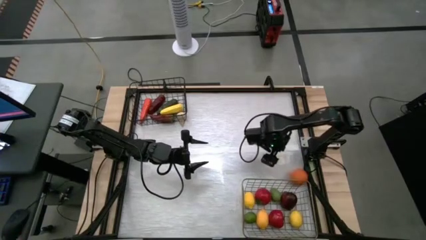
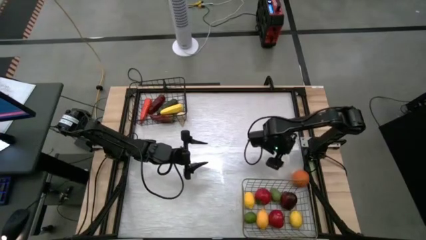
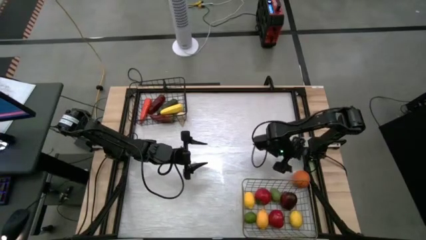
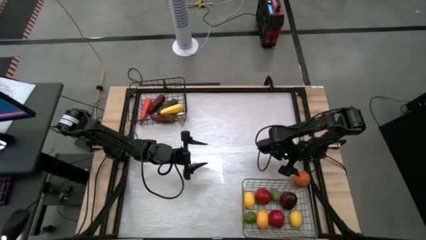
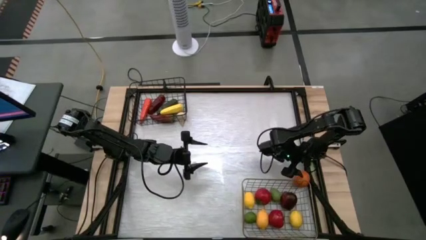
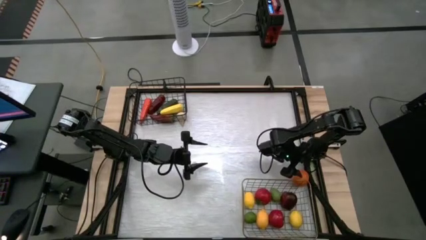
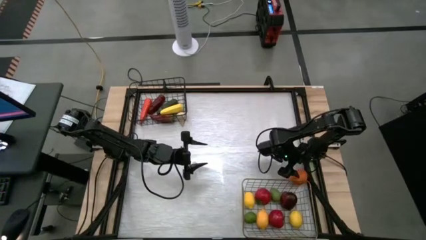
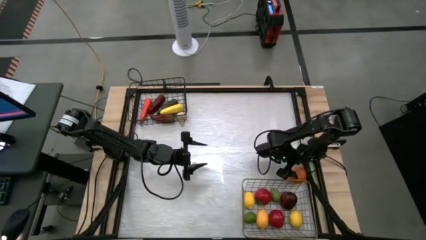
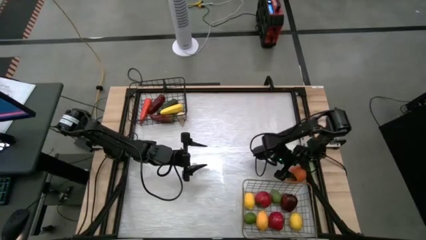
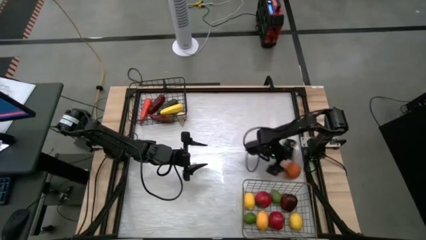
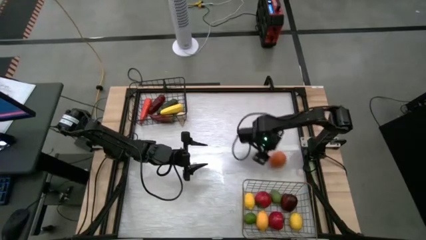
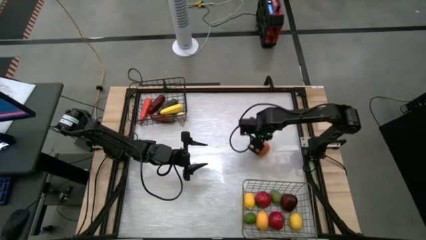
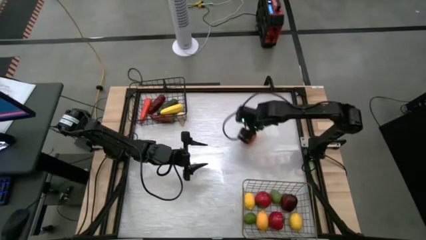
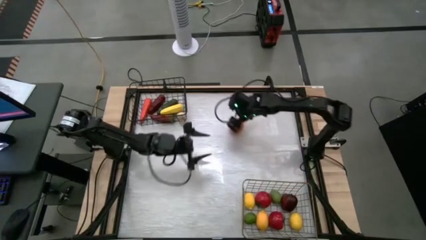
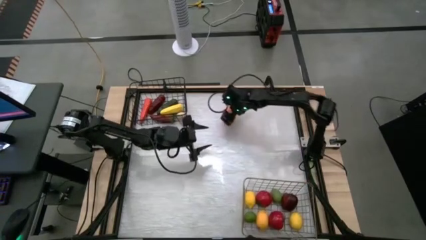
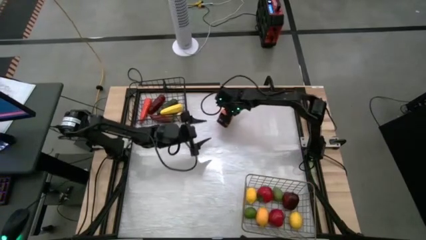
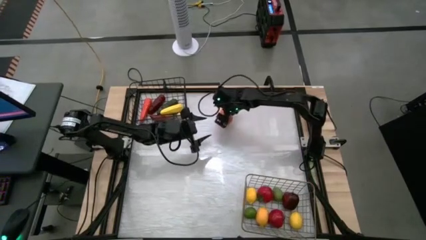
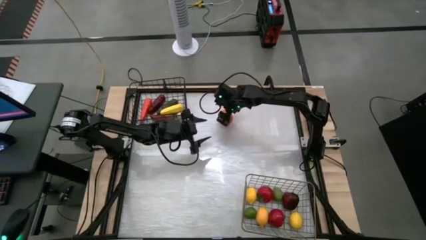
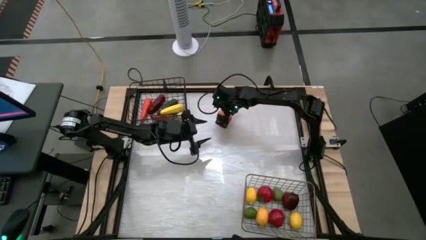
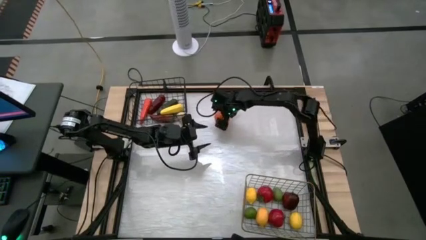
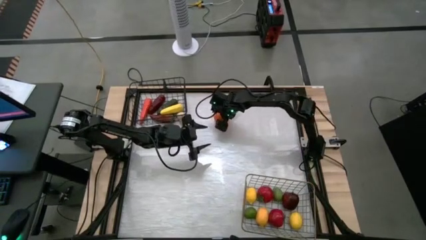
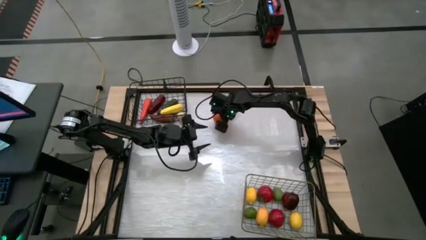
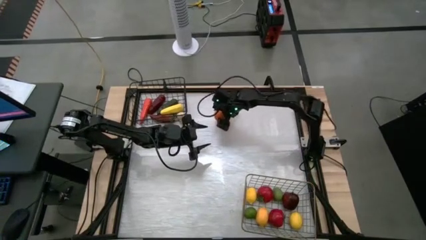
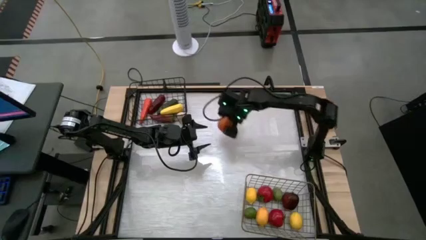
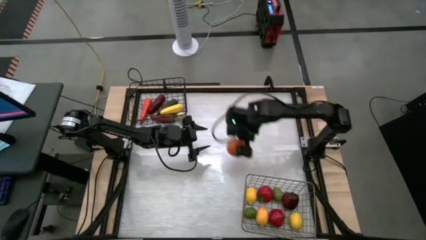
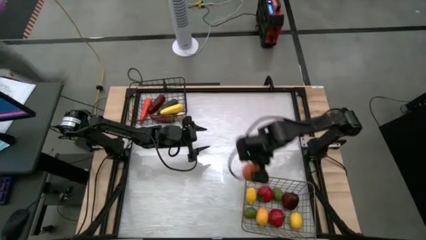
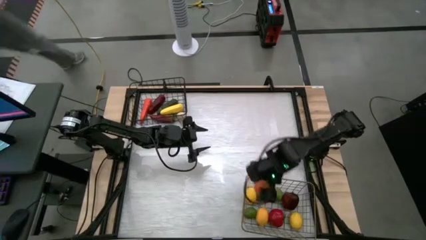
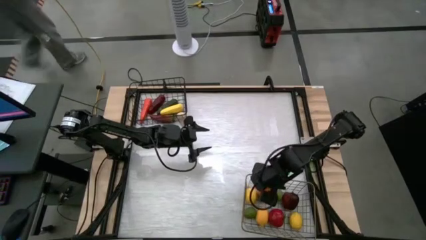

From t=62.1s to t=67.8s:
Task: Sort produce into baskets
Put the orange into the gold wire basket

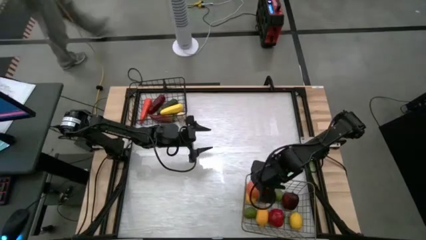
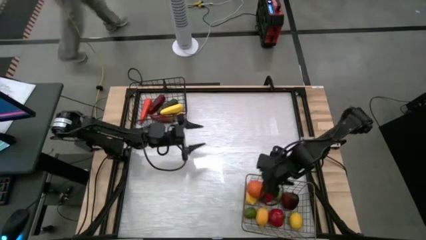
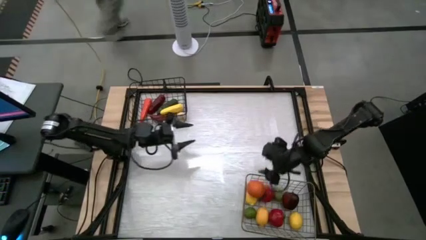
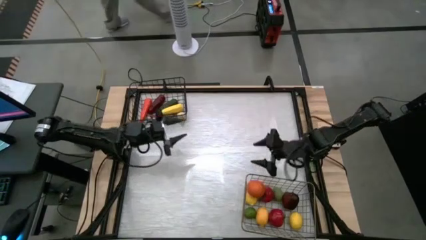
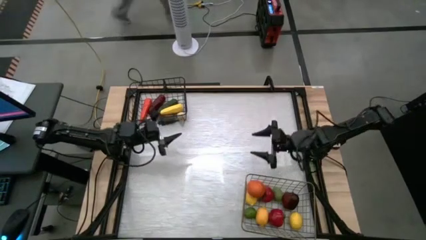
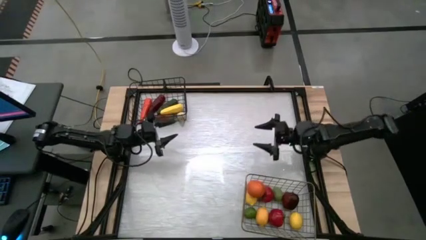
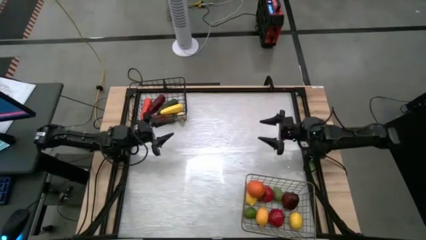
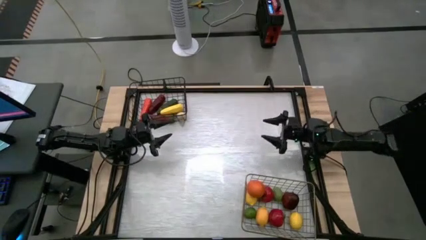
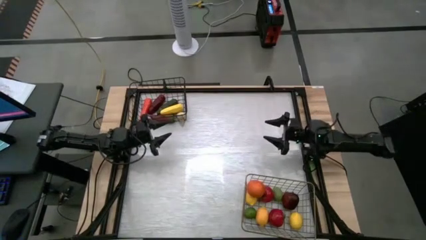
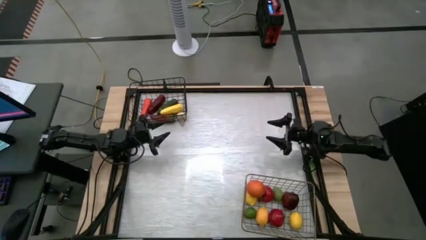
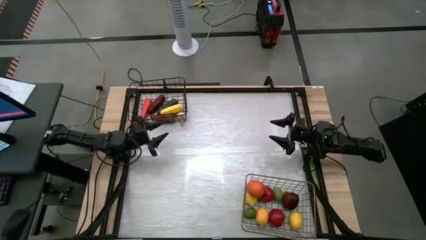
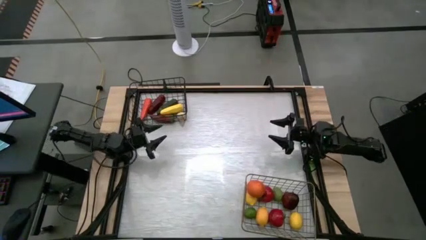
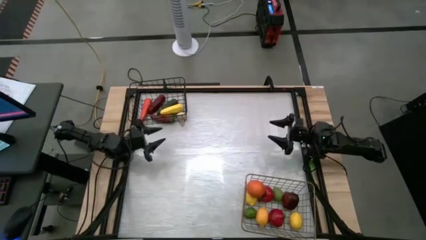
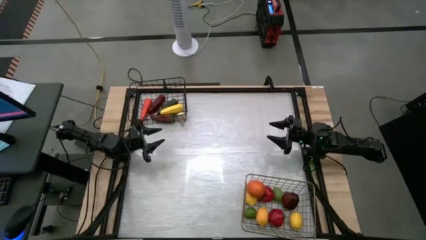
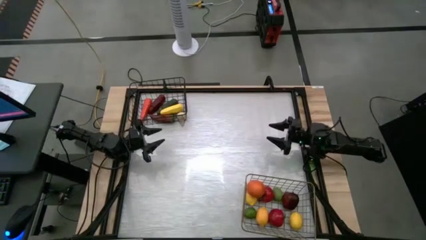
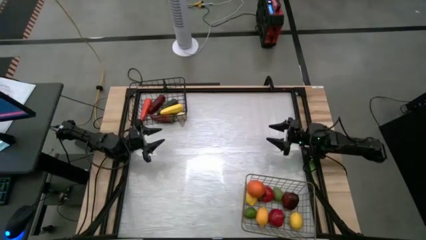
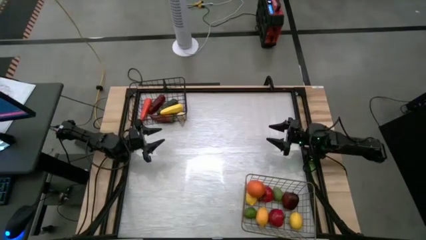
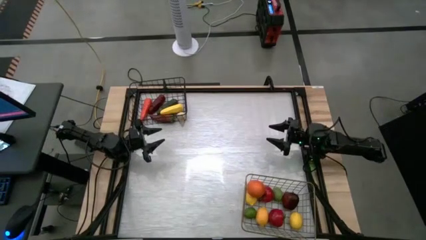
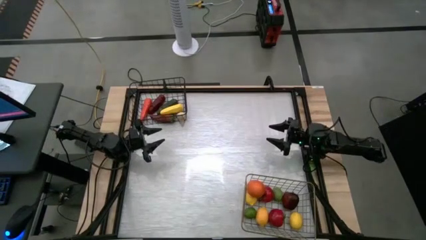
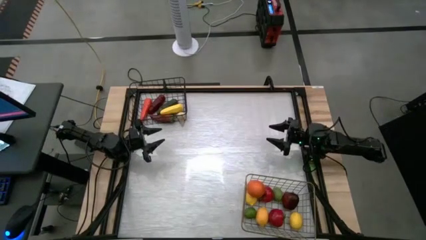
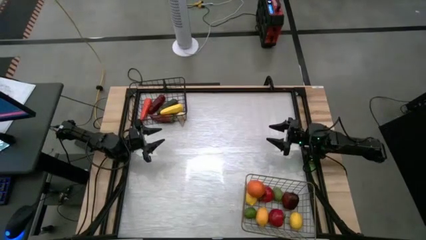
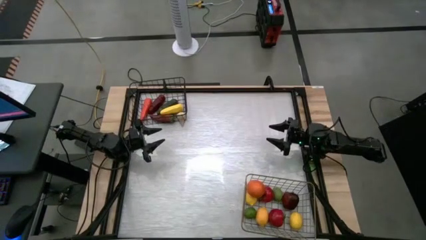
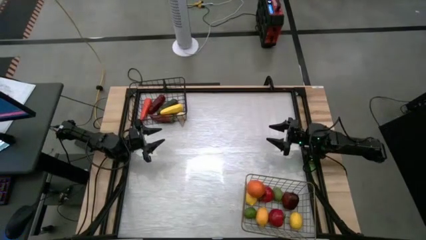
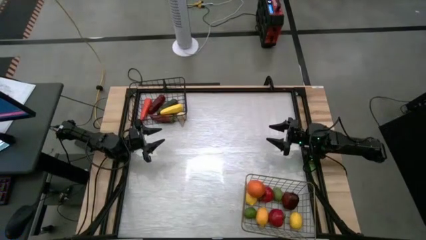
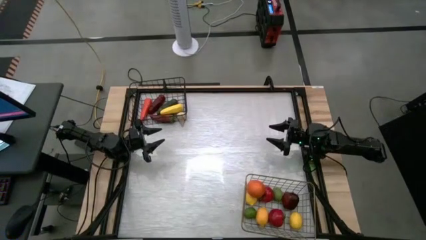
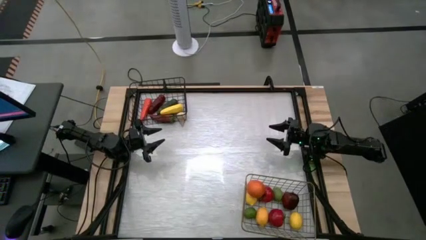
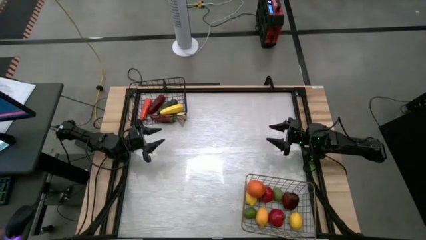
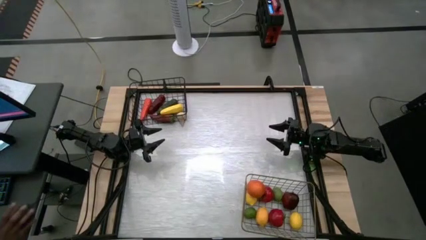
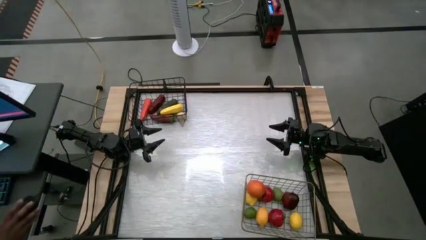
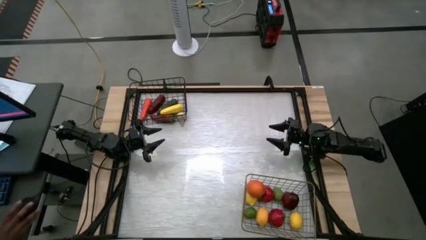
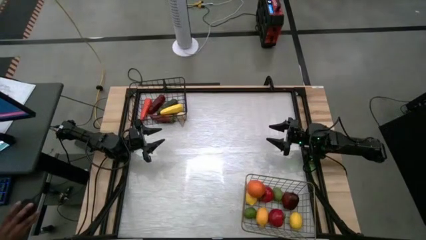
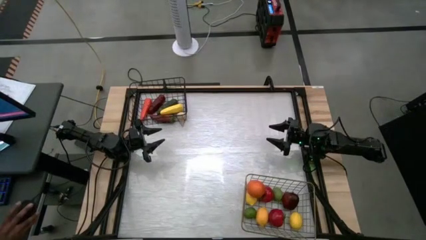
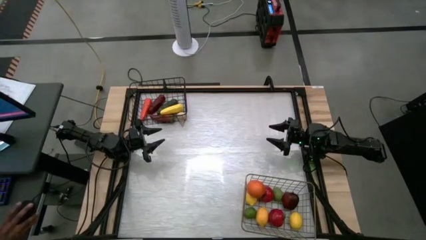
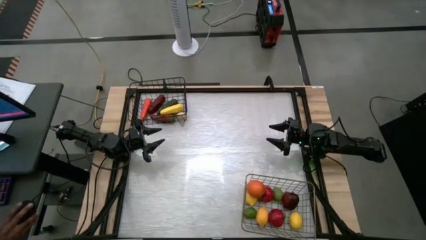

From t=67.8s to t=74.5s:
Return to Home Position

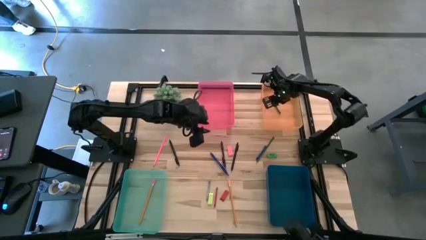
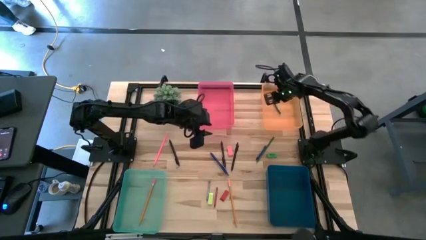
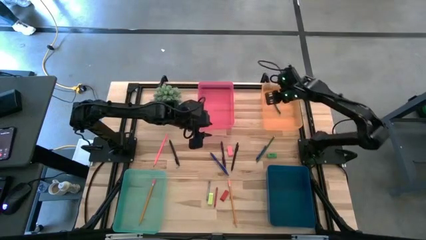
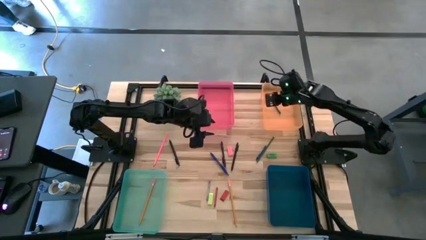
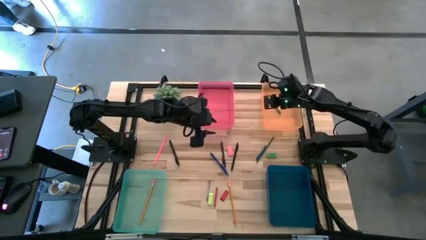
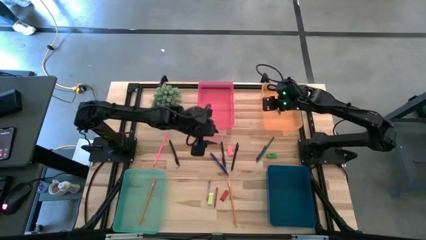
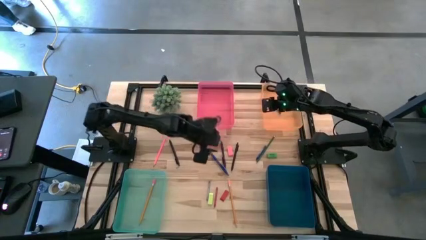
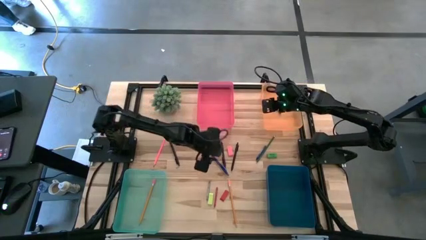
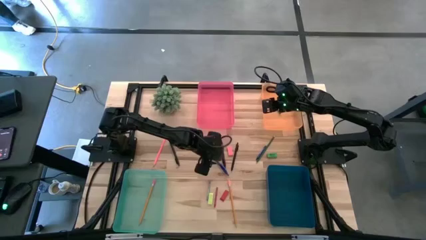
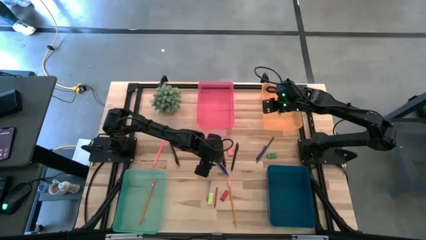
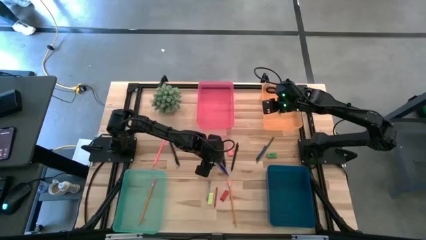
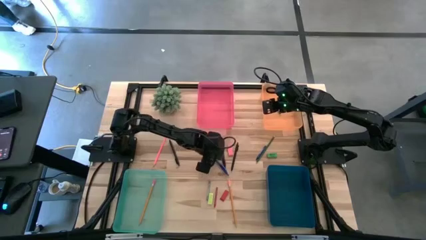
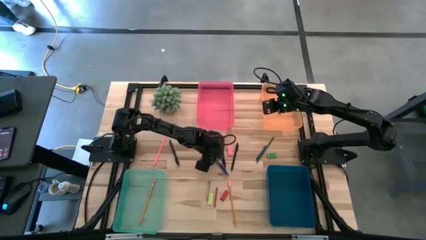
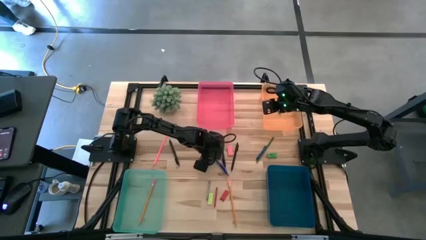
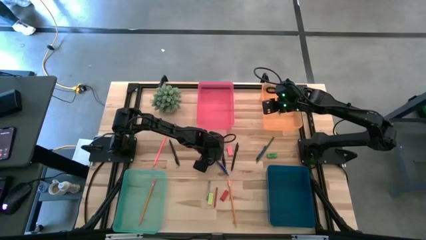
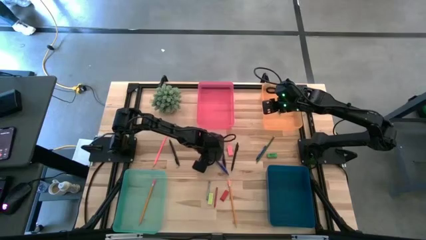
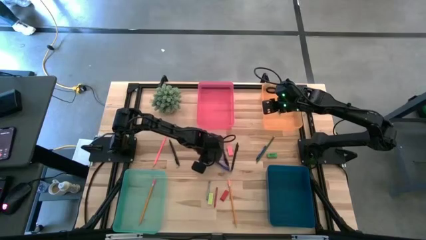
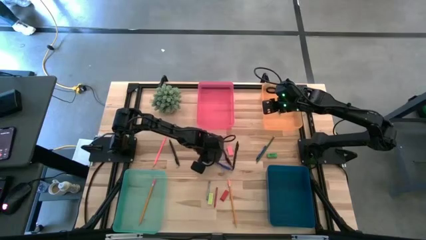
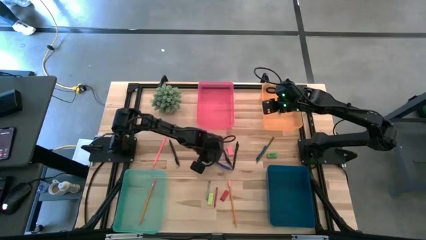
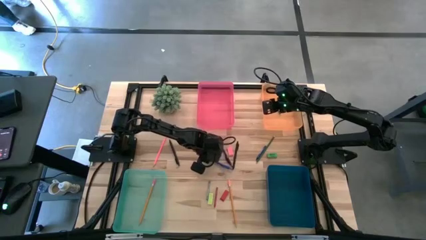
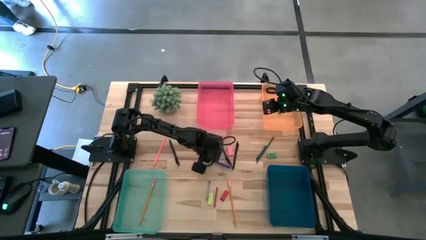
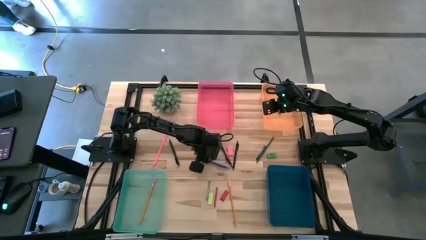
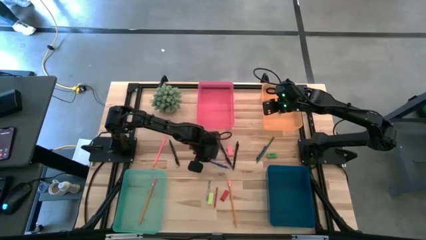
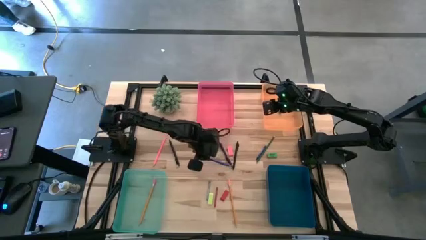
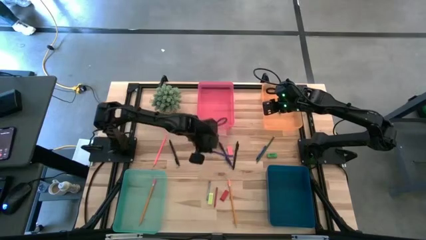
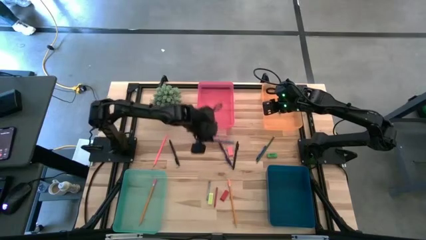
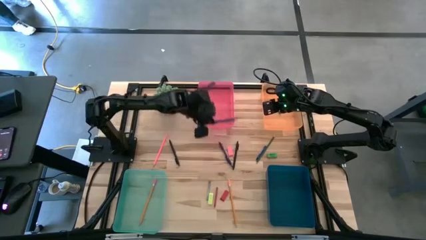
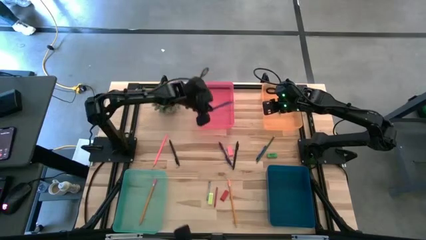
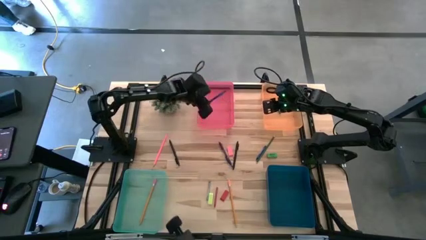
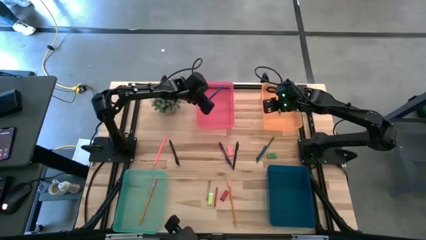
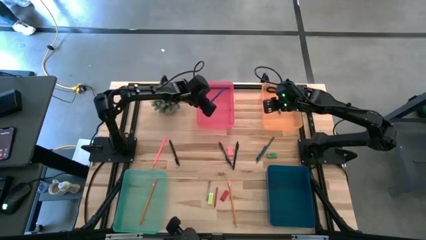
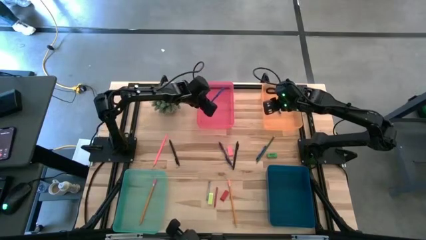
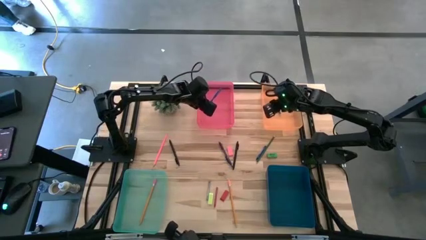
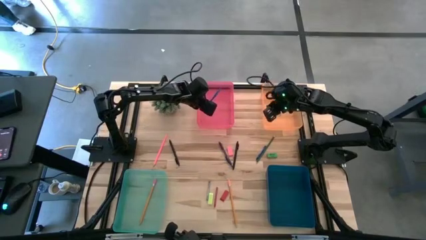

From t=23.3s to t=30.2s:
Task: Sort crayons/erasers/pens/pencils in bins
Put the blue pen into the red bin
